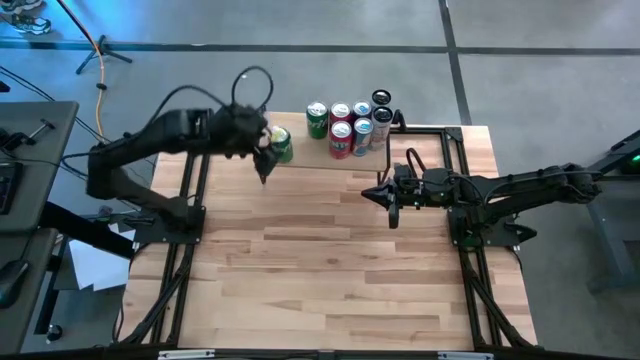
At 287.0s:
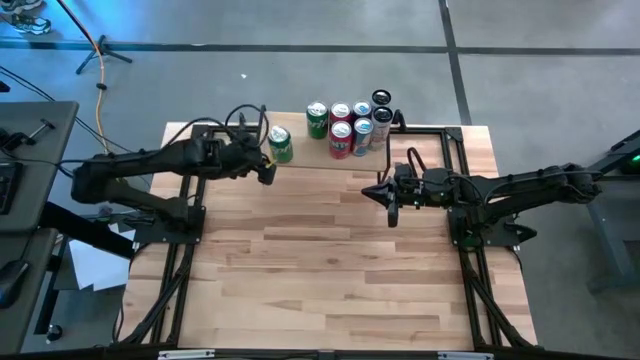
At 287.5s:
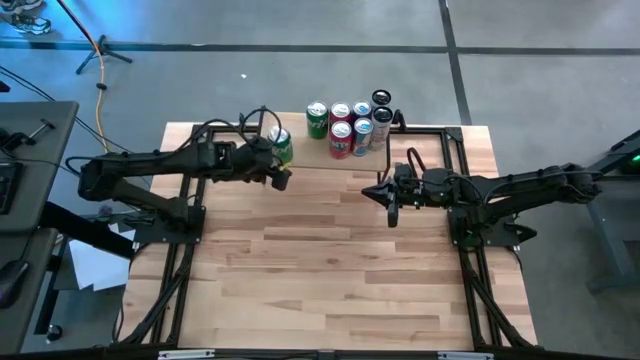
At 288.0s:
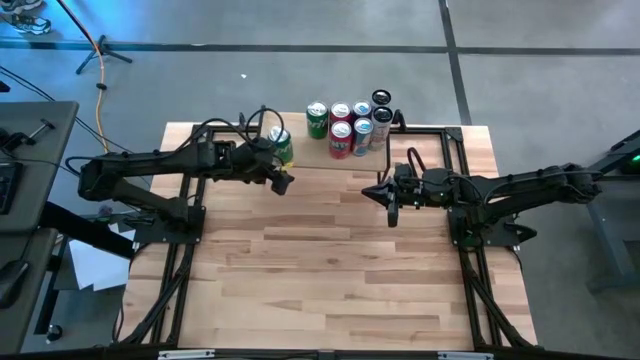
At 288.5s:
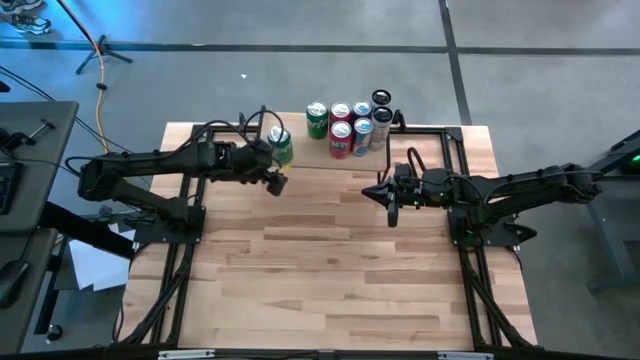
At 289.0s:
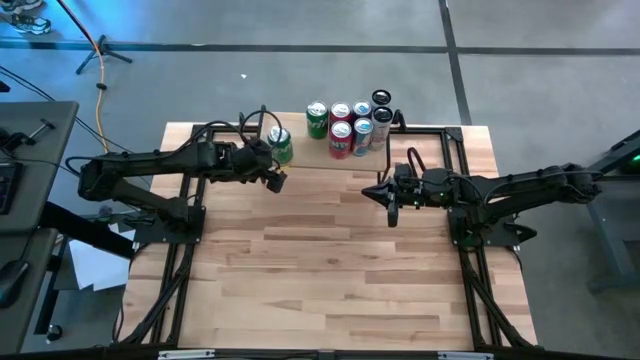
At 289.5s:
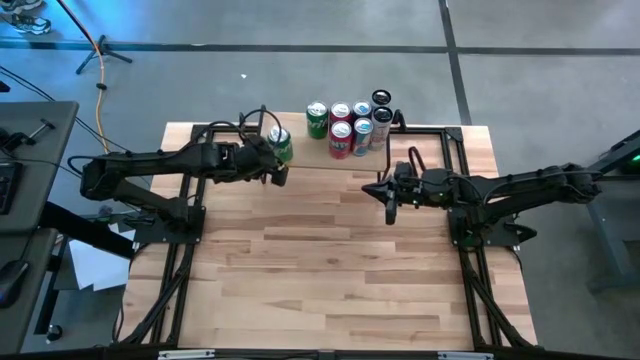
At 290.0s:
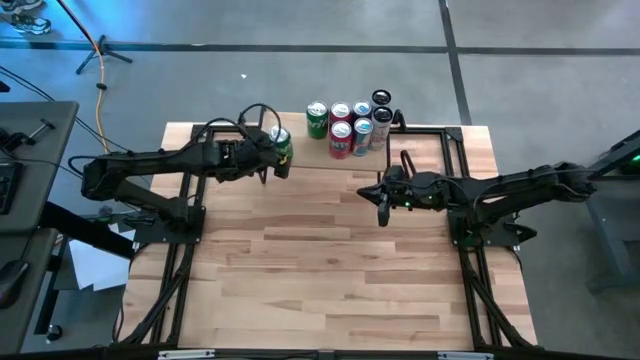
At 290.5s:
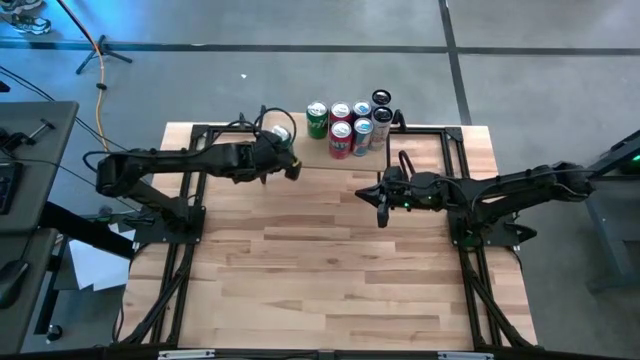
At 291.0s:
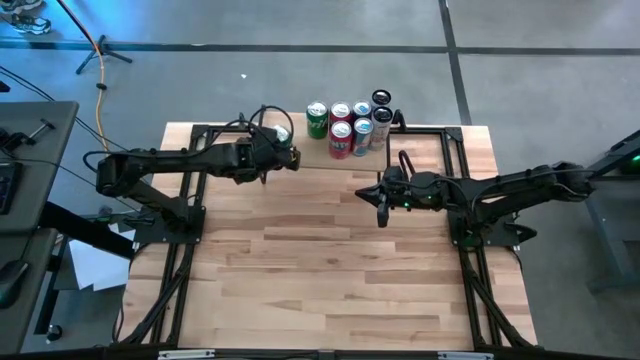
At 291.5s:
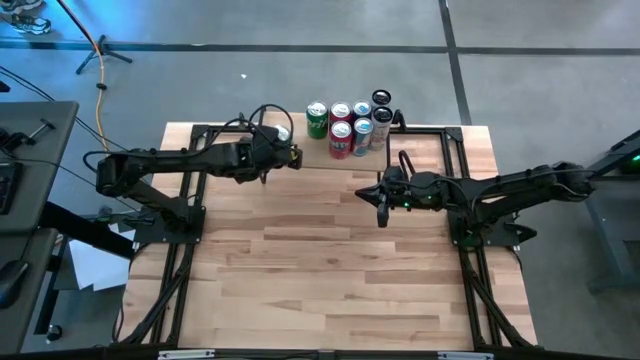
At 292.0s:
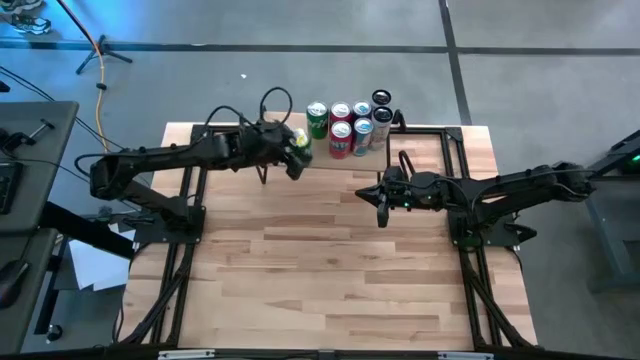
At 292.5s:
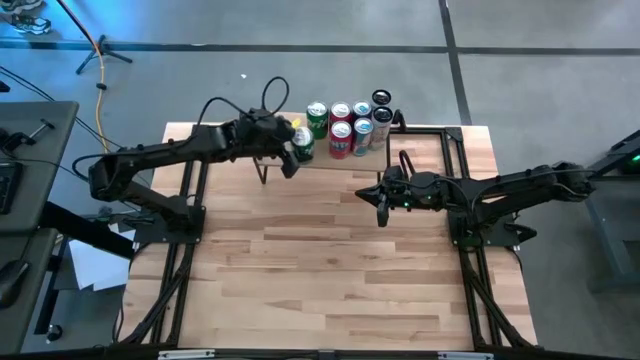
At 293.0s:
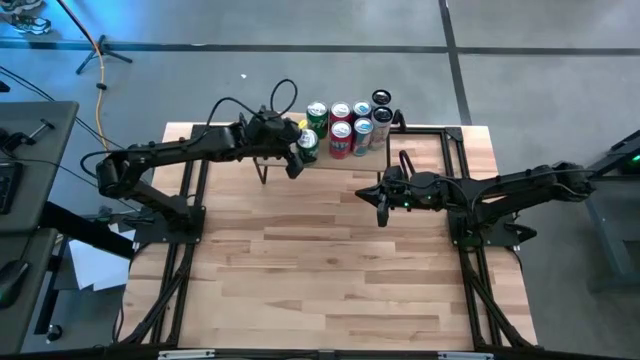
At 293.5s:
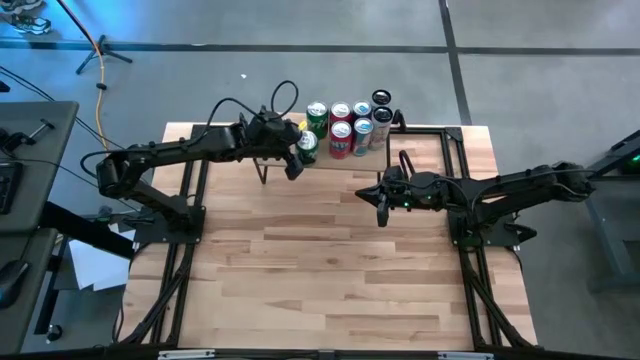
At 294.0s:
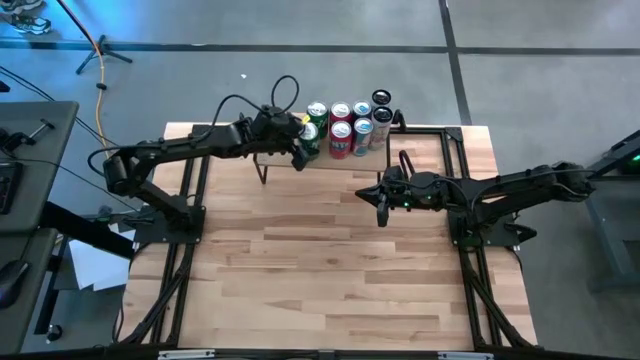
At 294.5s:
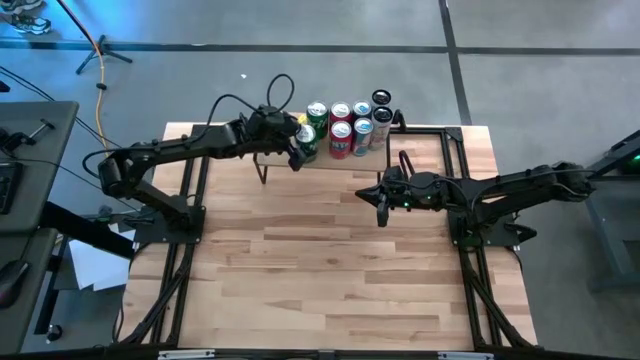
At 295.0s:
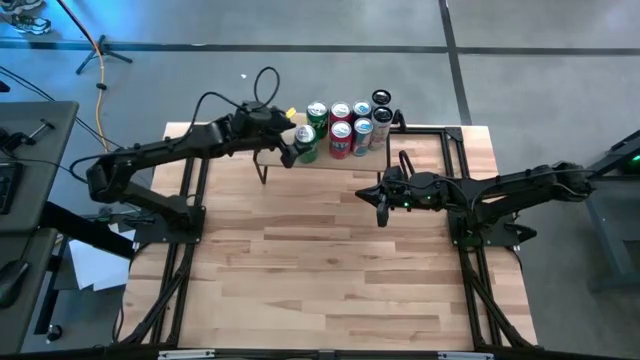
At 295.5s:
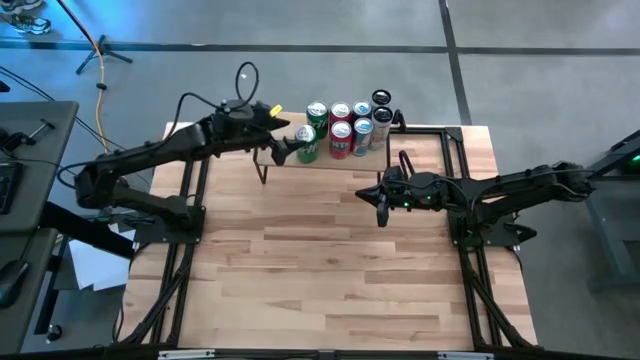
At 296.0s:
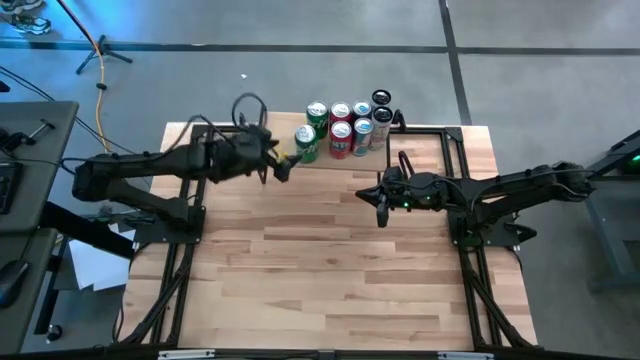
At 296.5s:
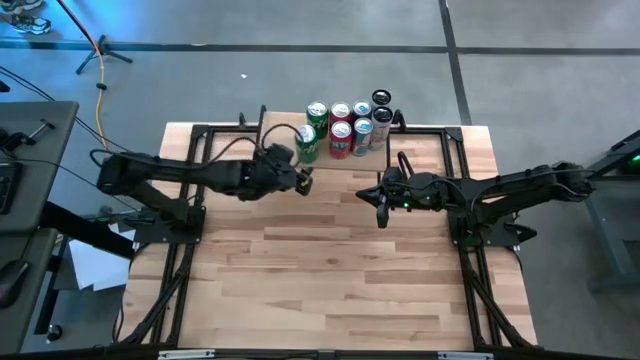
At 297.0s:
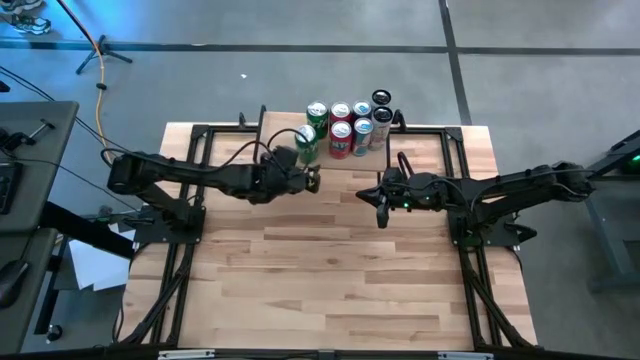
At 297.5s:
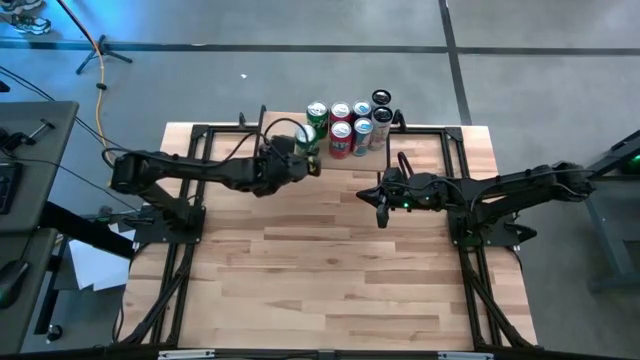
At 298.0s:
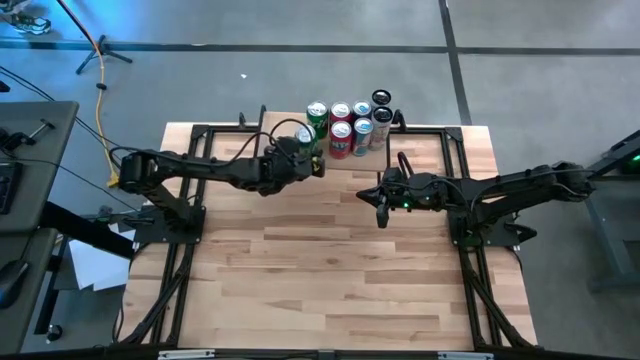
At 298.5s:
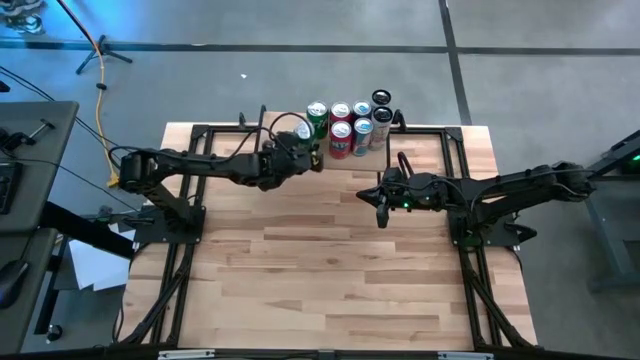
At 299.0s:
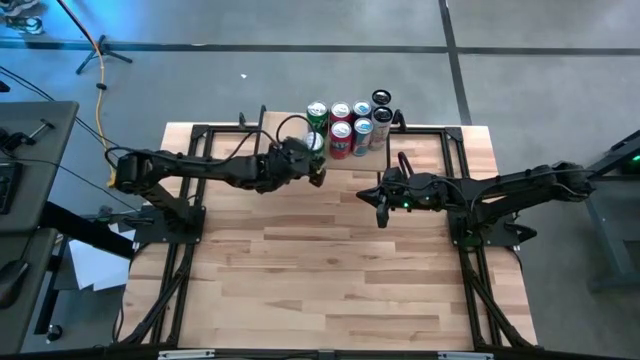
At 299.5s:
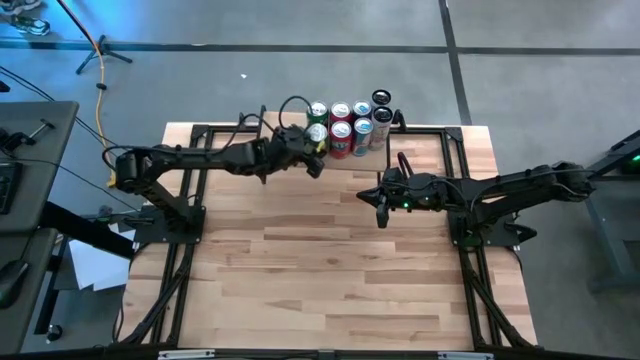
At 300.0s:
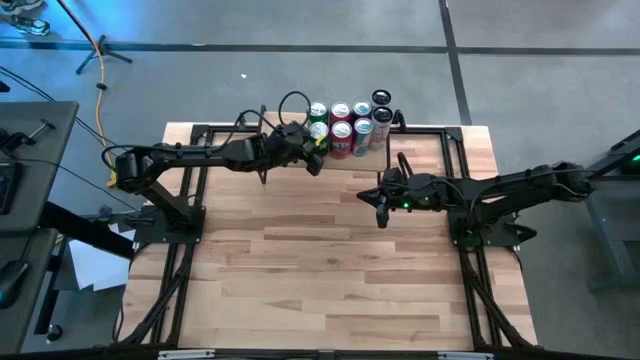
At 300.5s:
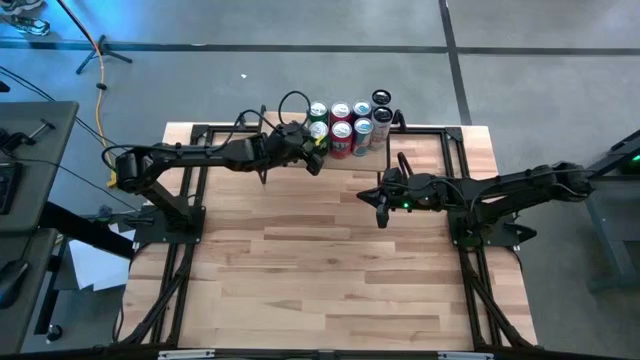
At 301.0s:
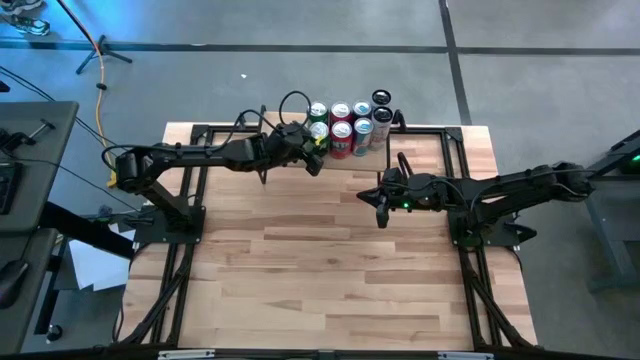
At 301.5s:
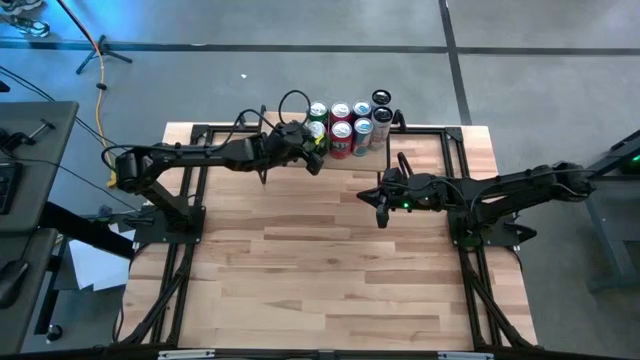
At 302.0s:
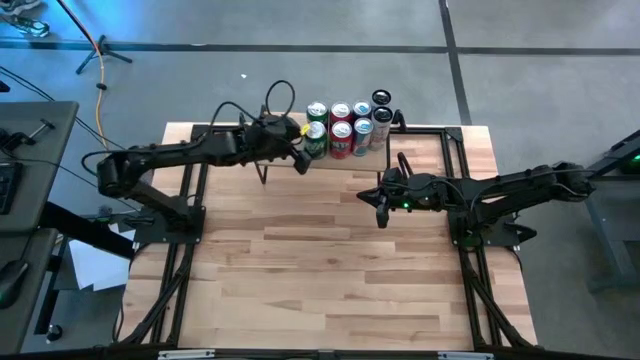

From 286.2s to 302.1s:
Task: Place canned beverage on shelf
Put the green soda can on the shelf aligned with the other green soda can
